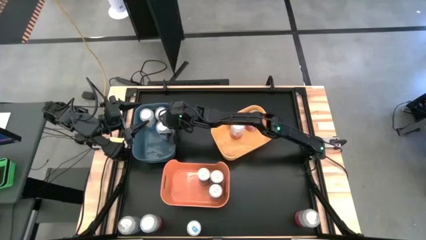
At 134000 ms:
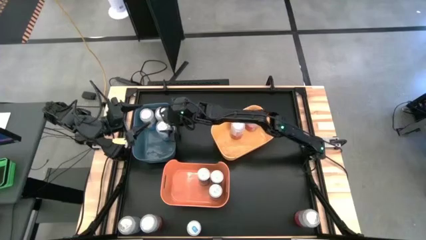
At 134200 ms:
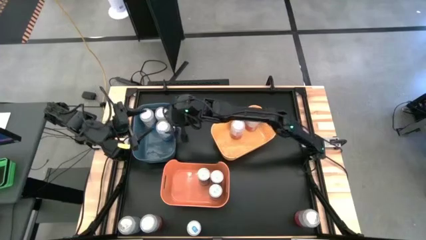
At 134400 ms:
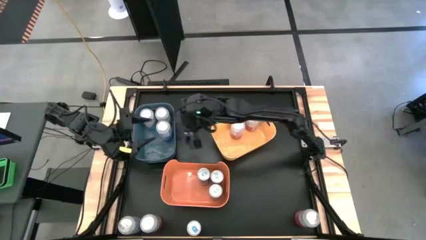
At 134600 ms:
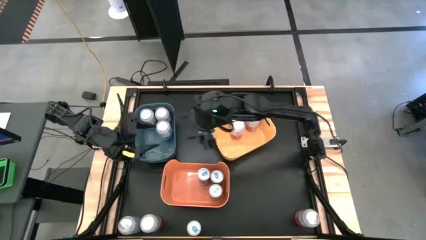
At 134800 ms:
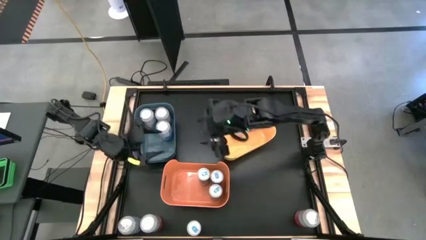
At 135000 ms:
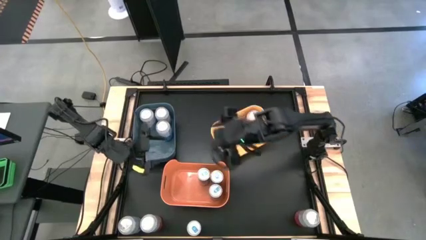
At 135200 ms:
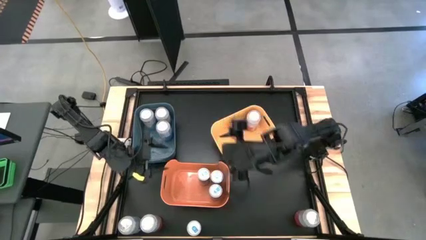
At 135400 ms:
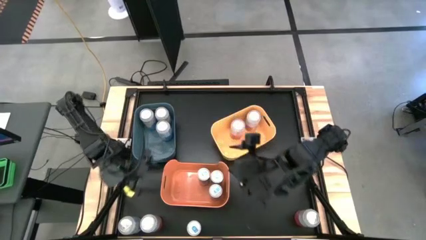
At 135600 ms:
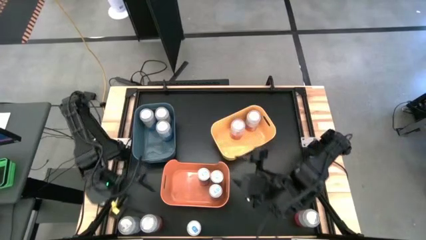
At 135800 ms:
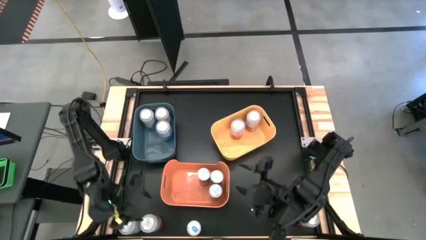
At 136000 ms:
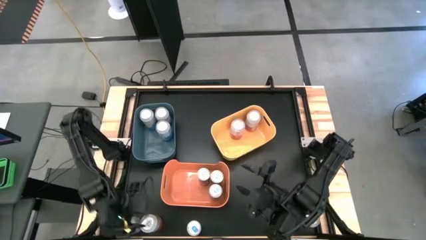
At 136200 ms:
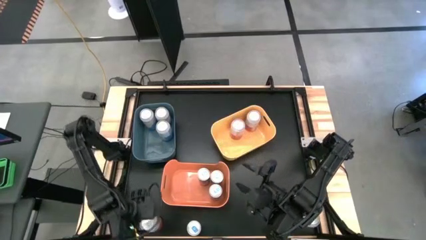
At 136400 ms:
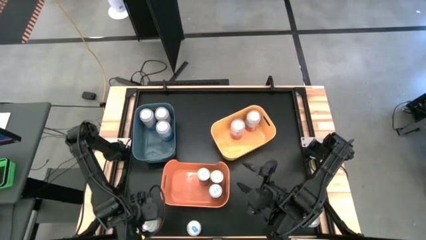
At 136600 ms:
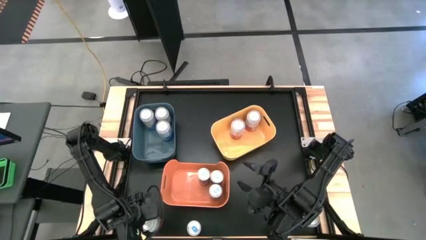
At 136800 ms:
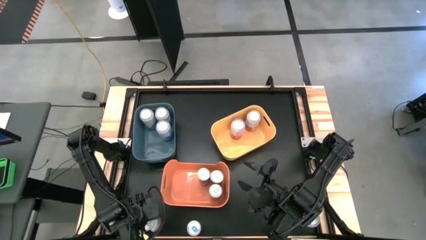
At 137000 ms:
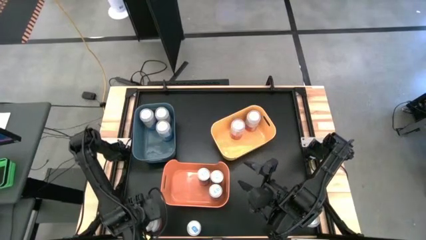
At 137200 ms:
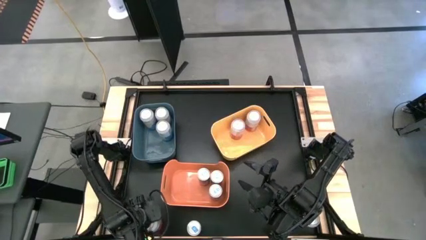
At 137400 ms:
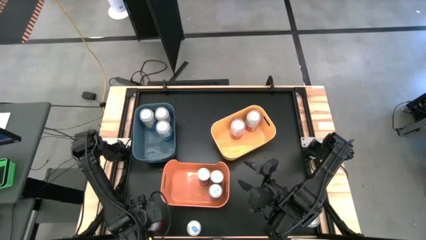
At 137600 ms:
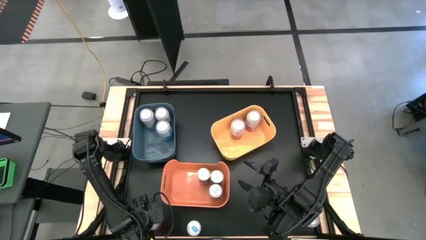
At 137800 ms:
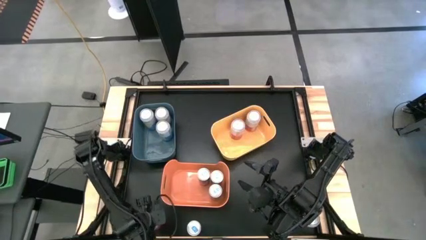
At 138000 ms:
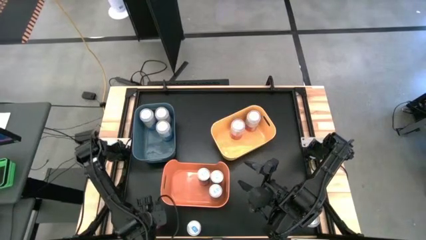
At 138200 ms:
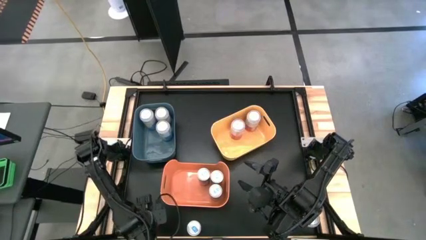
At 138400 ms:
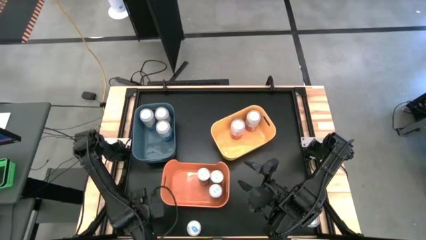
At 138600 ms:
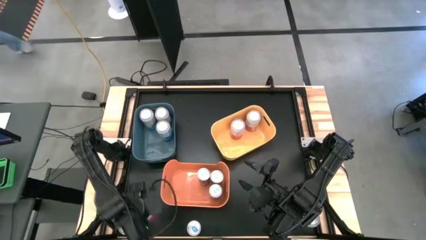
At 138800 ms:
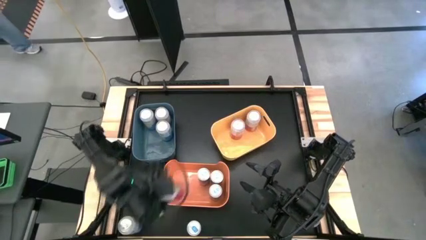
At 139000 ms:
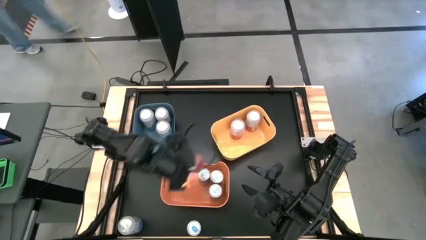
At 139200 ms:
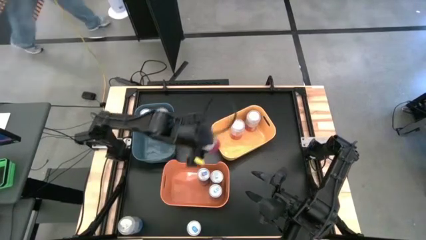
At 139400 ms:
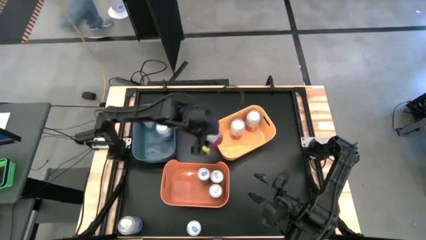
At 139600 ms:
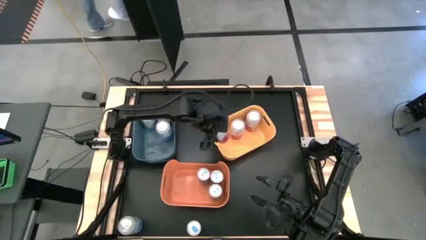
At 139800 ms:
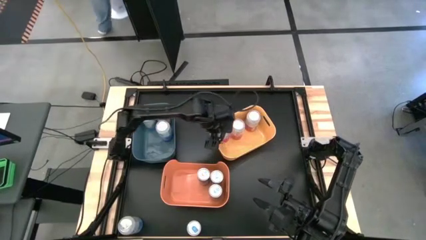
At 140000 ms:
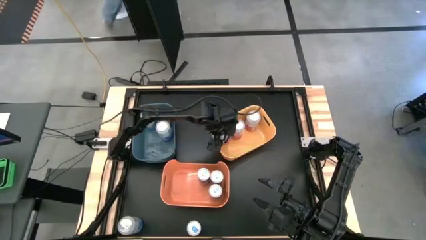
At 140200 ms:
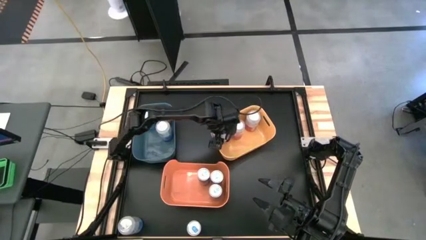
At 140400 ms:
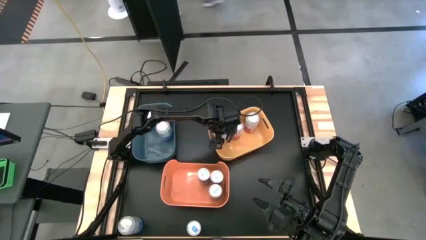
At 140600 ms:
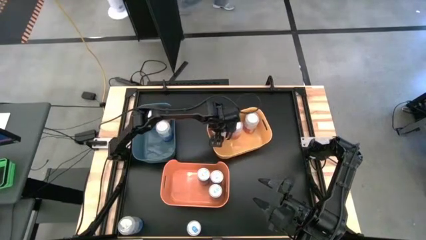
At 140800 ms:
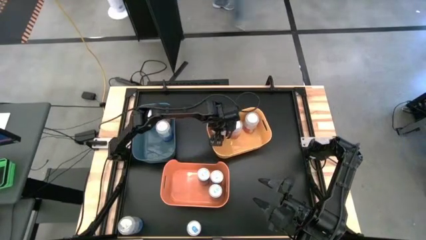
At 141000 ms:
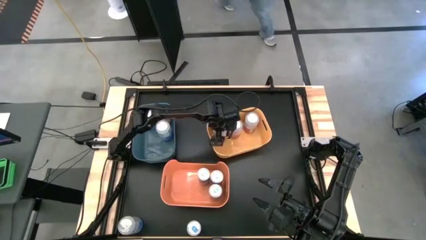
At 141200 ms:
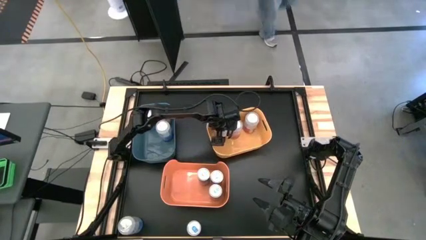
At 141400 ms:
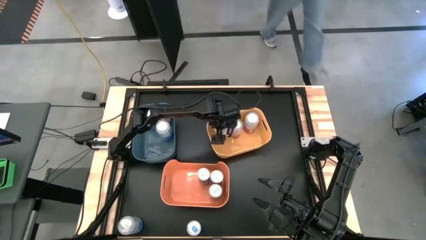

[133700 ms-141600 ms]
Task: Sort soda cans
Put the pink soda can into the yellow bin

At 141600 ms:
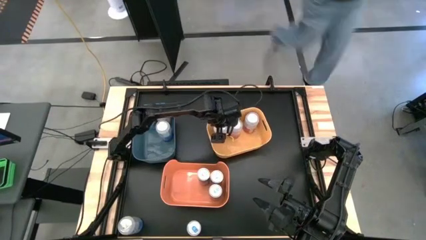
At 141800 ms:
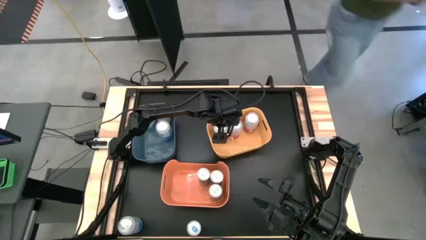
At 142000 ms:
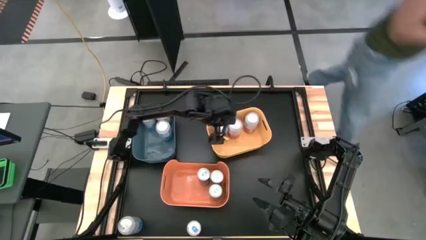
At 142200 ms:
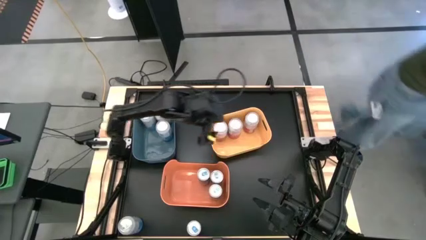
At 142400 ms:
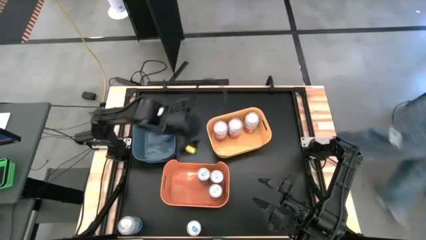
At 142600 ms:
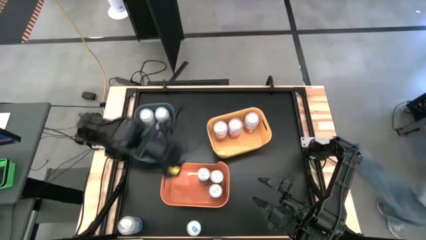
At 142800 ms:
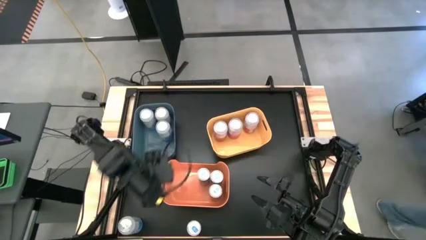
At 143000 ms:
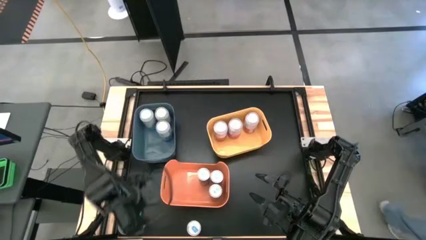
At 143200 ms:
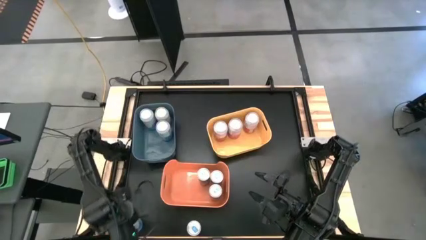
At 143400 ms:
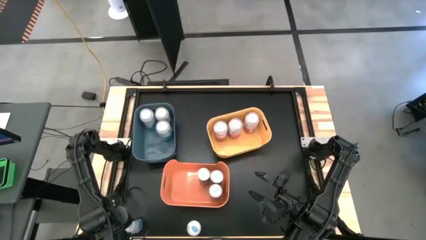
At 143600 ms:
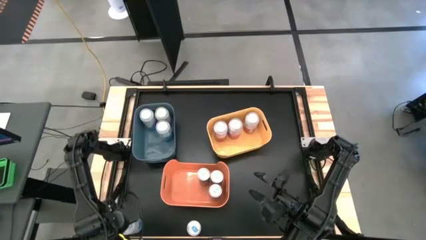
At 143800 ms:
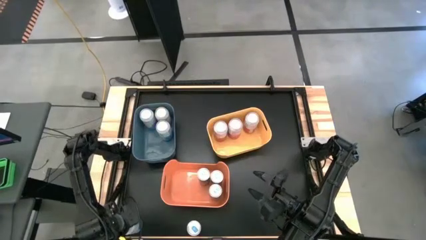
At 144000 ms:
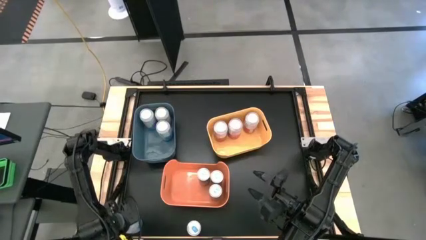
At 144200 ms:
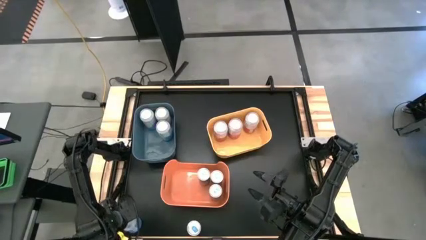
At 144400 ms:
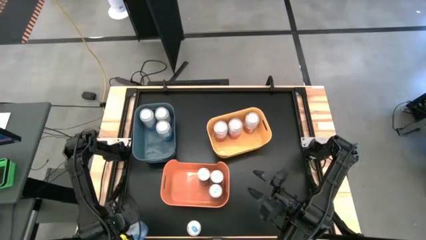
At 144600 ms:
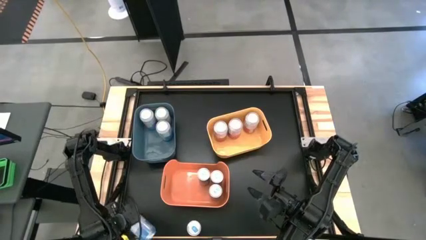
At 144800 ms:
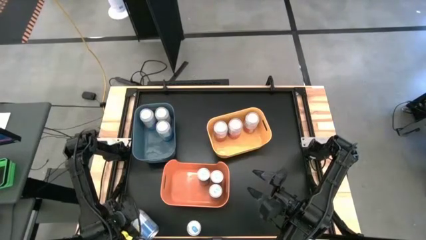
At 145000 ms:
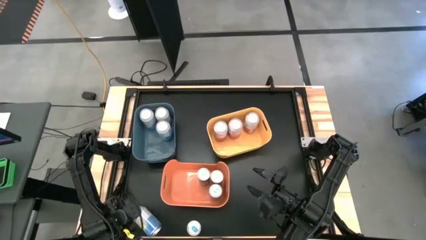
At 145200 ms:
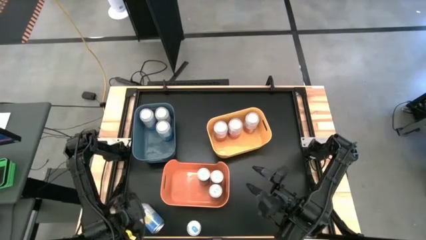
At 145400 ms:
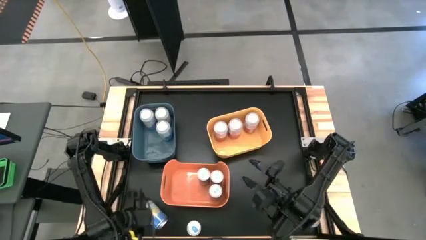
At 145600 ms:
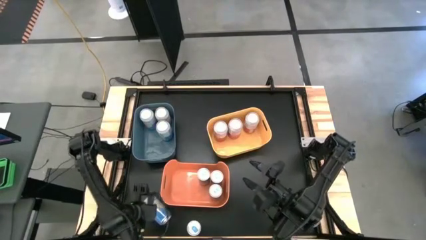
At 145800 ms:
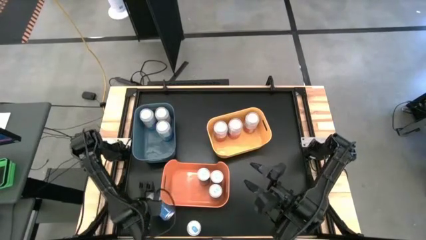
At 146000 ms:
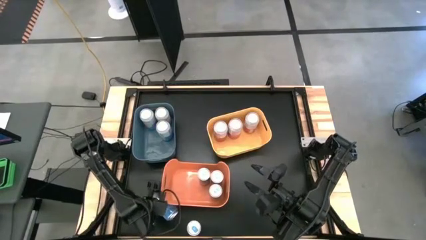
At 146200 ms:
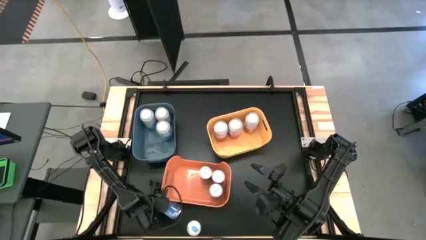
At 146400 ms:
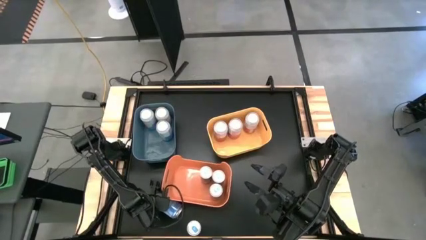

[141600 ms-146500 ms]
Put the blue soda can into the blue bin

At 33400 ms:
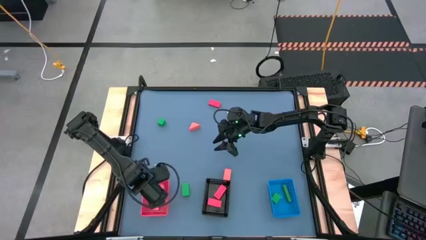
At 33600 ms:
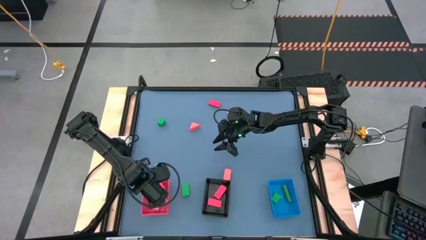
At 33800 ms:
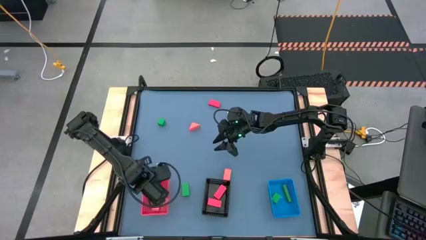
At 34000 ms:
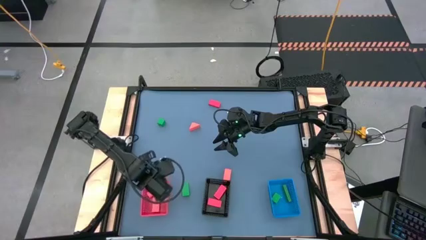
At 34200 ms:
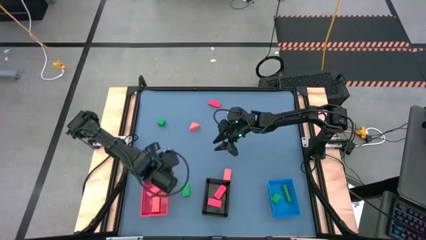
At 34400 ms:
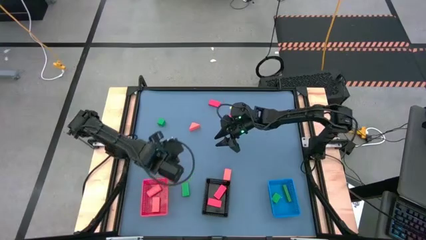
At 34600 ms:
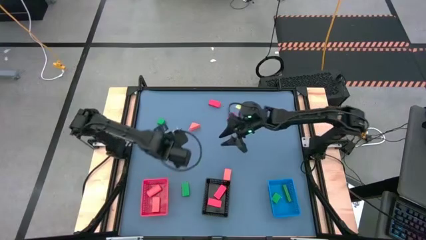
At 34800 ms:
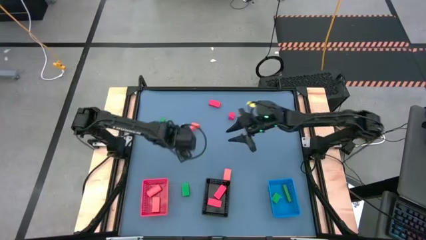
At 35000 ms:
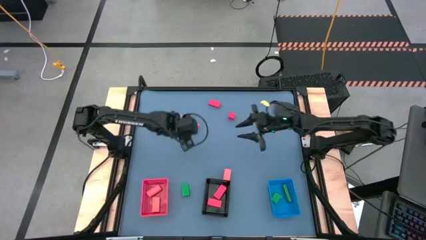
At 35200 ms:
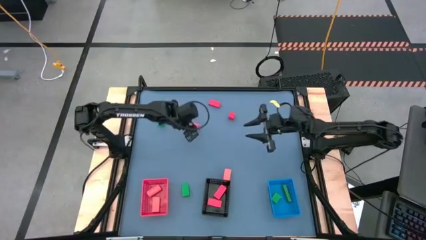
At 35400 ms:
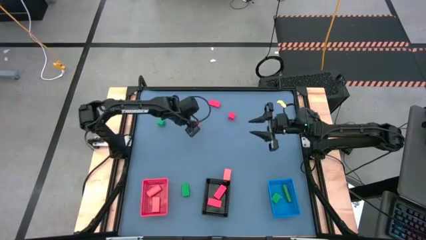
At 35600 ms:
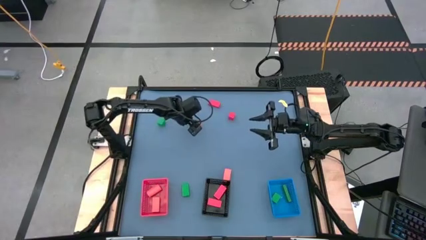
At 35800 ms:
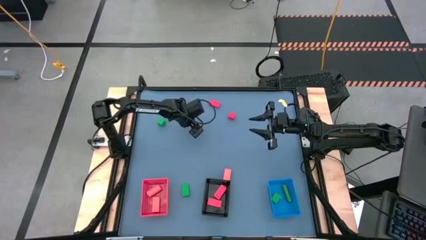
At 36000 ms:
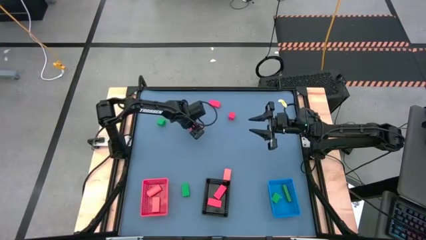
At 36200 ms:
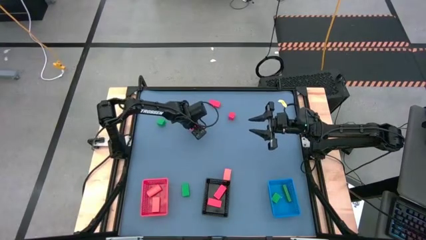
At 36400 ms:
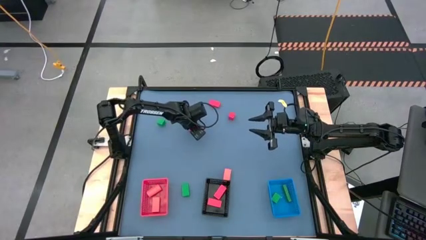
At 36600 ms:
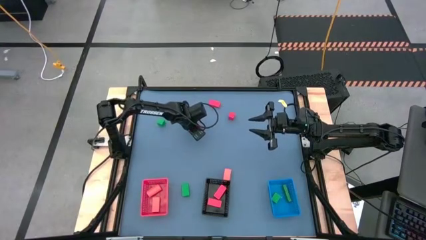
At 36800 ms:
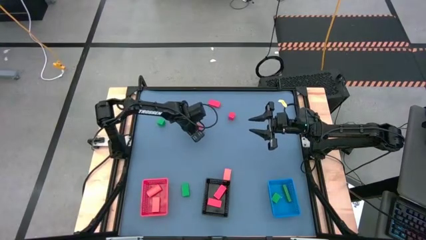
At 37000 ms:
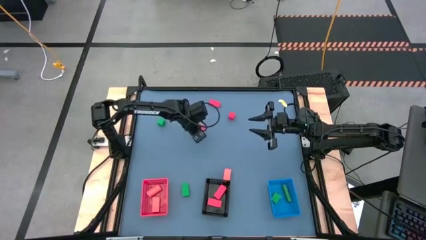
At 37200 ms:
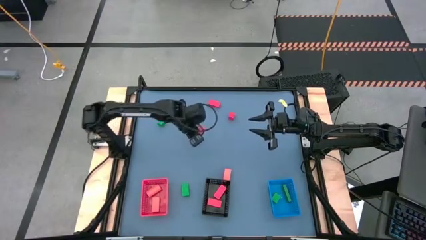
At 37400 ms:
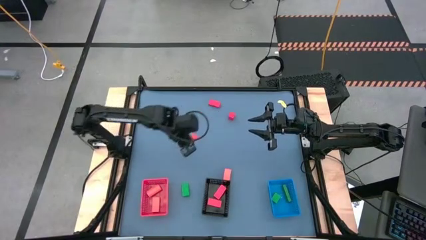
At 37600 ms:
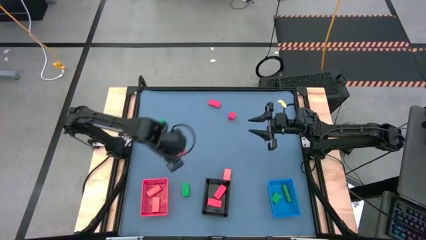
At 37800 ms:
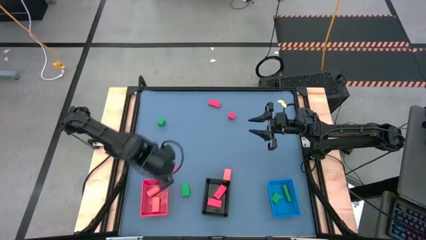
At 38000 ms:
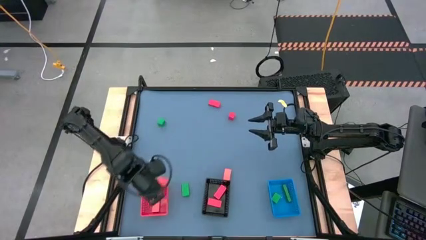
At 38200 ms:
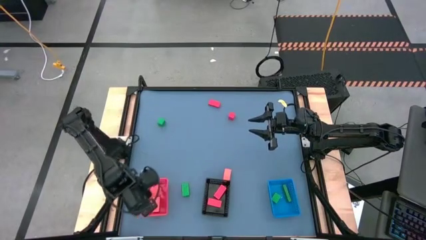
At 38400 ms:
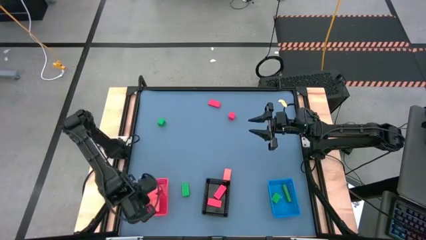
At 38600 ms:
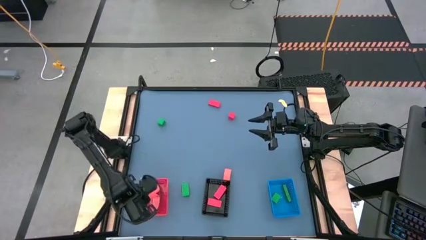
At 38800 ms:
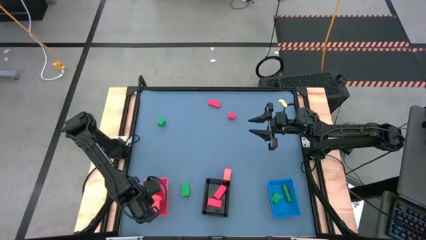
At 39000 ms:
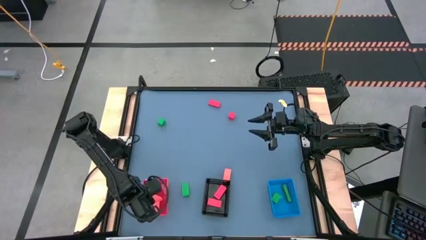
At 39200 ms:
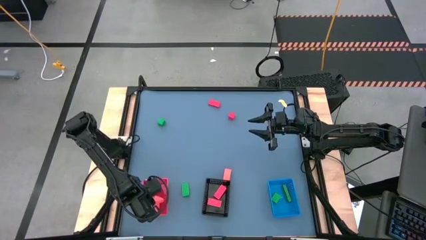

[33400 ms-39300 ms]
Task: Sort & place blocks by color
Put the orange block into the red bin
